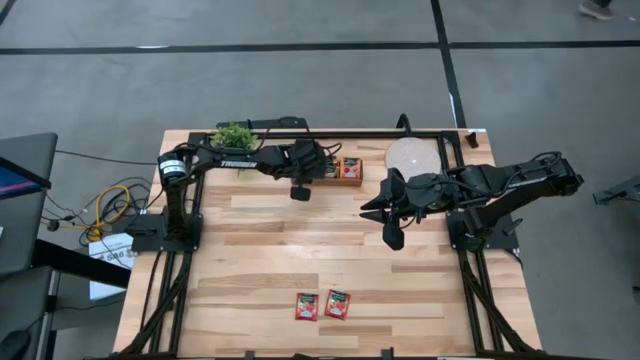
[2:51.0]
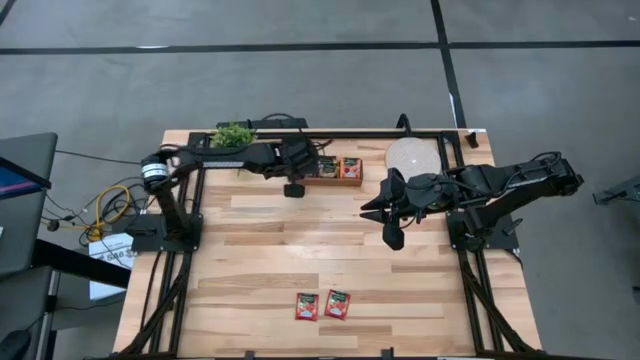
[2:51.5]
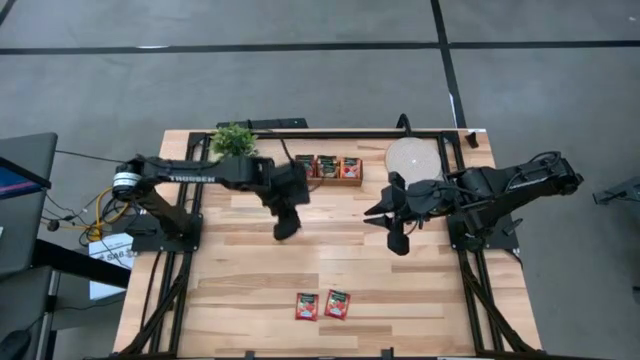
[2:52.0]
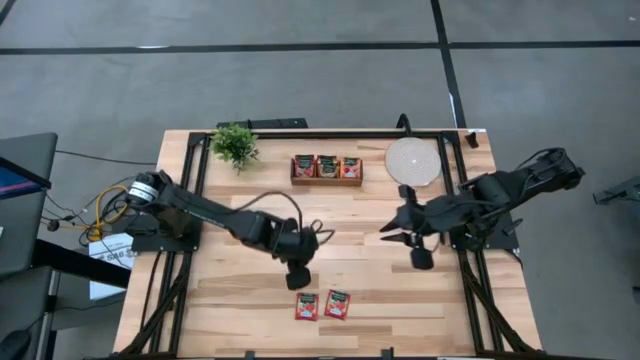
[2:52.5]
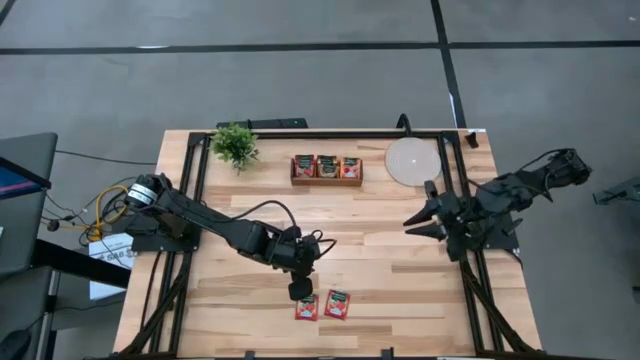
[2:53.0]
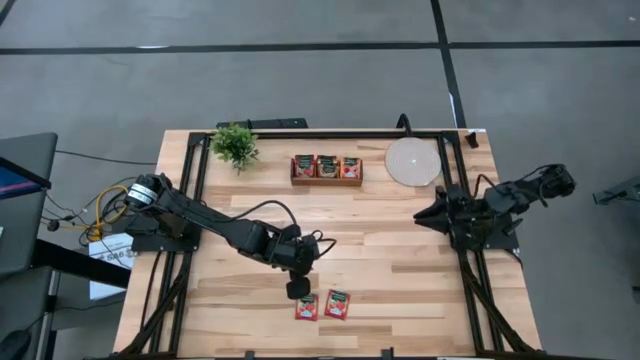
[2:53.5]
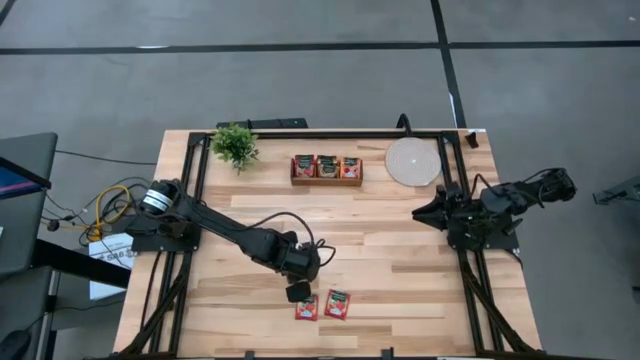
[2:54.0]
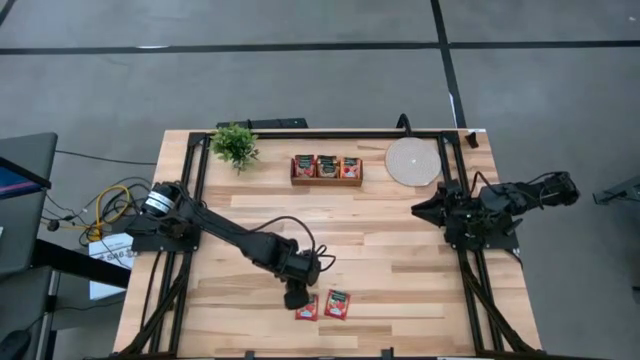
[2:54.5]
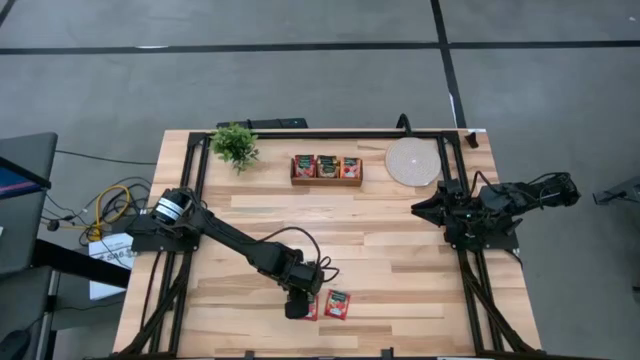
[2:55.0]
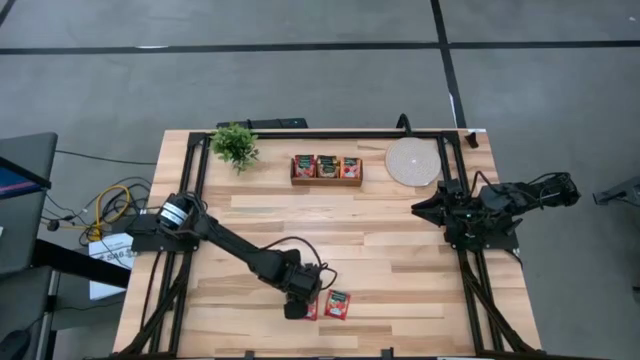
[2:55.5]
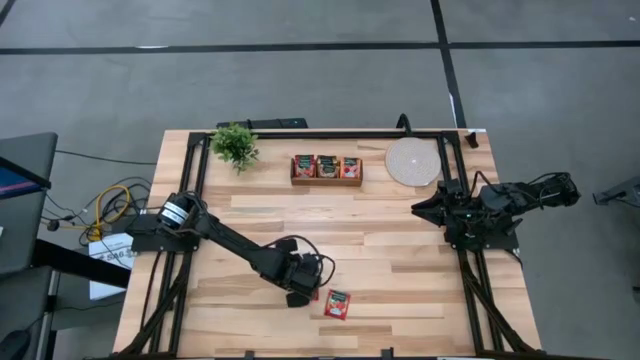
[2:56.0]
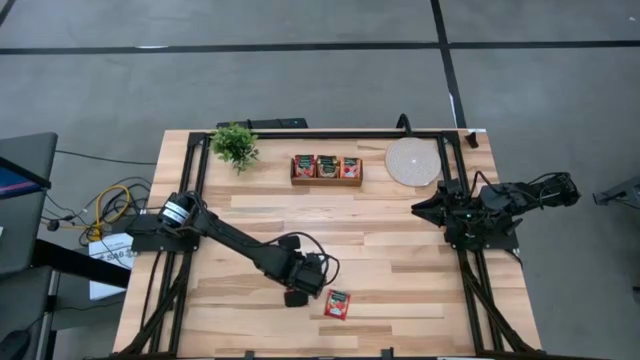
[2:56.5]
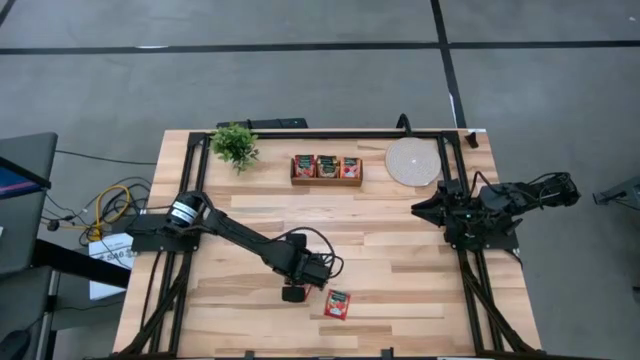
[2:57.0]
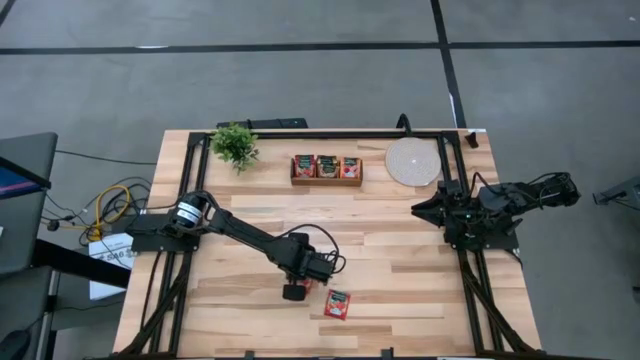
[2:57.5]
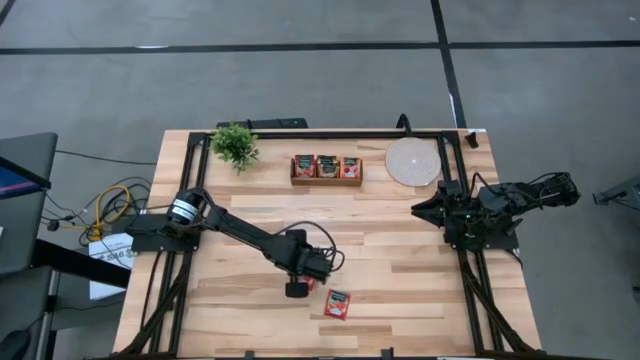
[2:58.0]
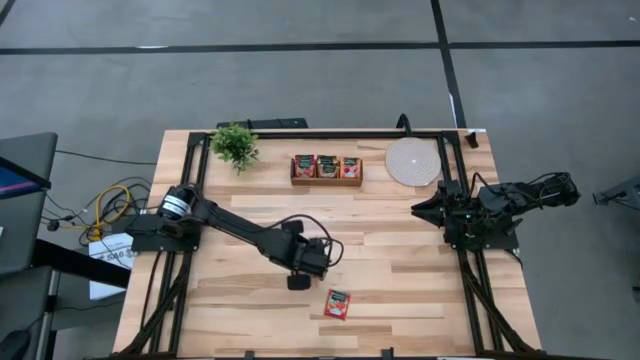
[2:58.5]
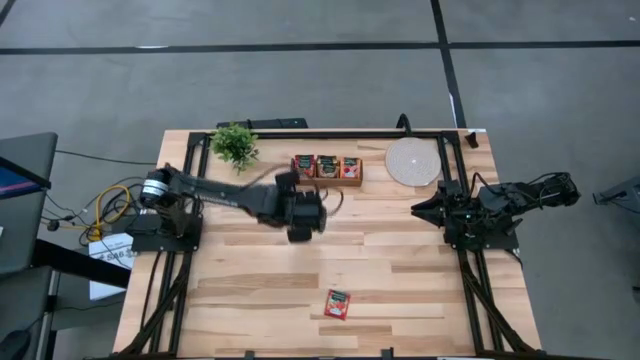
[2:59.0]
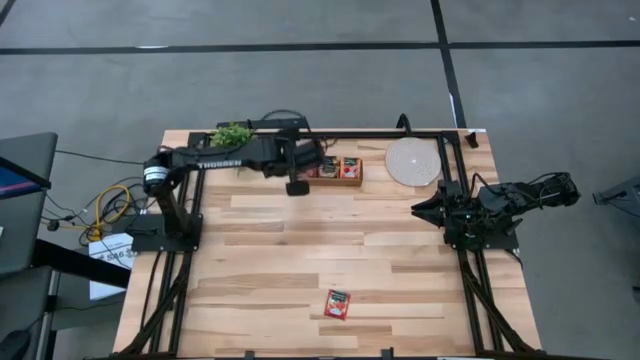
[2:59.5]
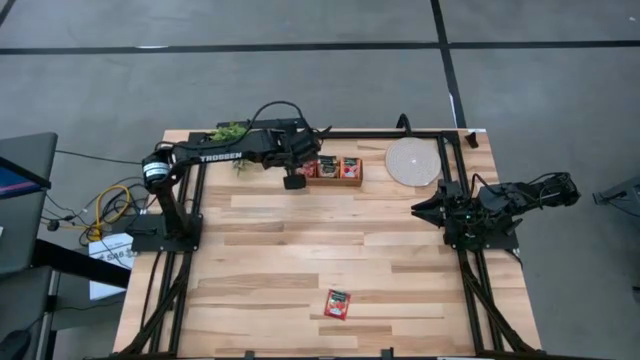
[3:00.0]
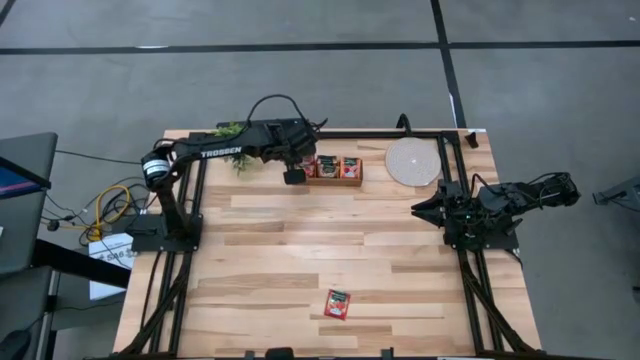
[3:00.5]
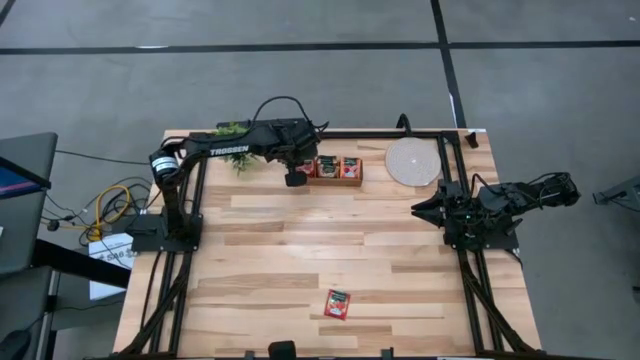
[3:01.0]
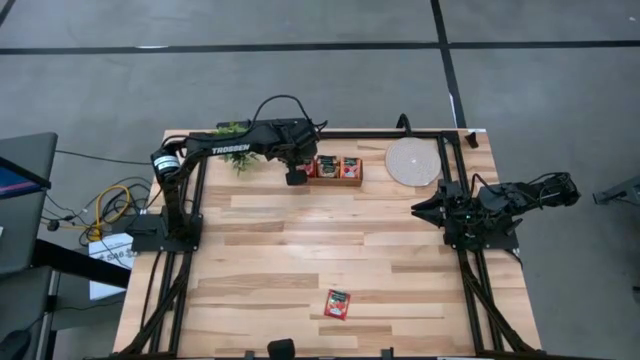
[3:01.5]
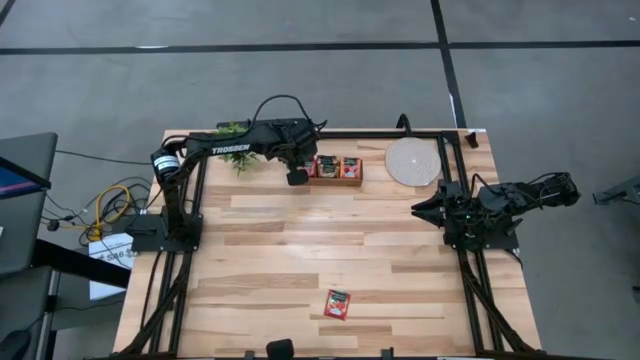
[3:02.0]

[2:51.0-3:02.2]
Task: Pick & Place Tea
Put the left red tea bag into the left section of the wooden organizer

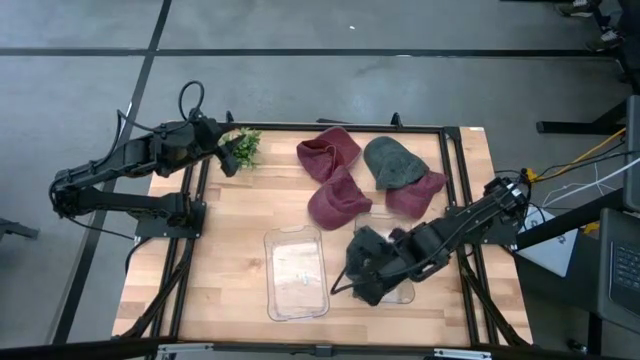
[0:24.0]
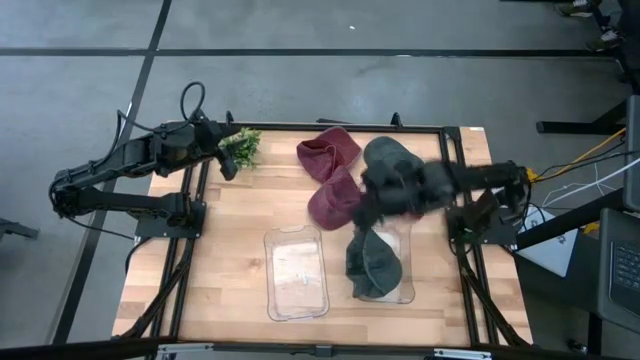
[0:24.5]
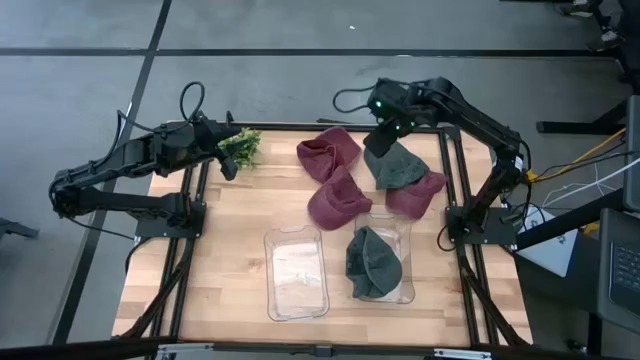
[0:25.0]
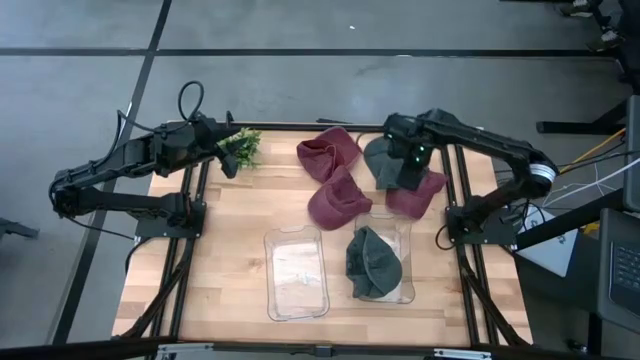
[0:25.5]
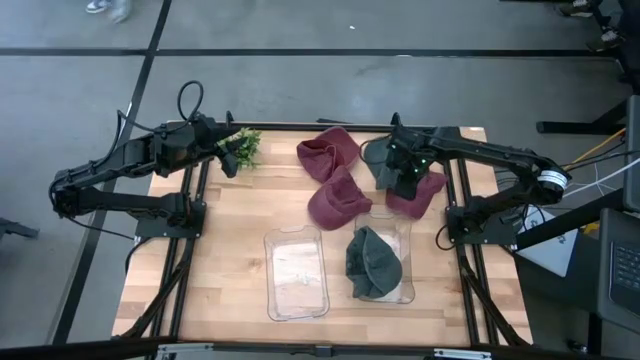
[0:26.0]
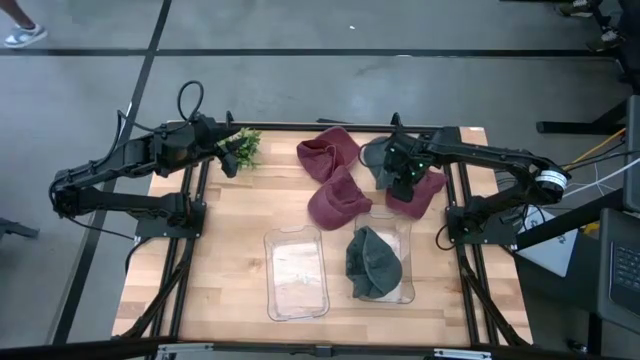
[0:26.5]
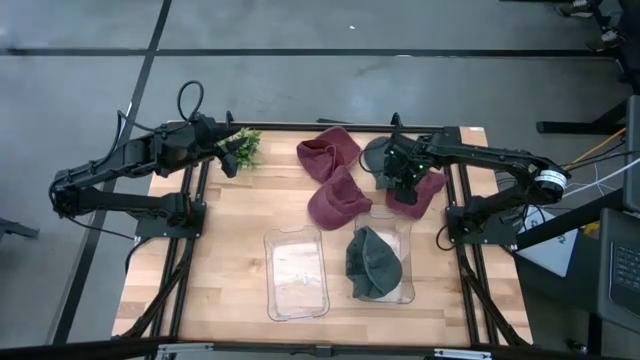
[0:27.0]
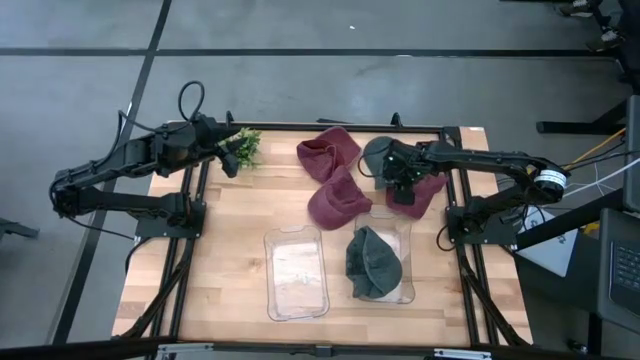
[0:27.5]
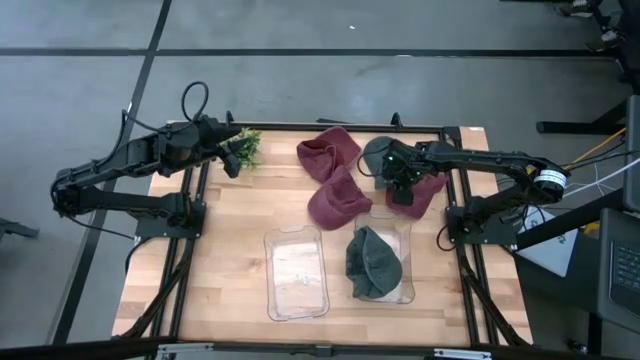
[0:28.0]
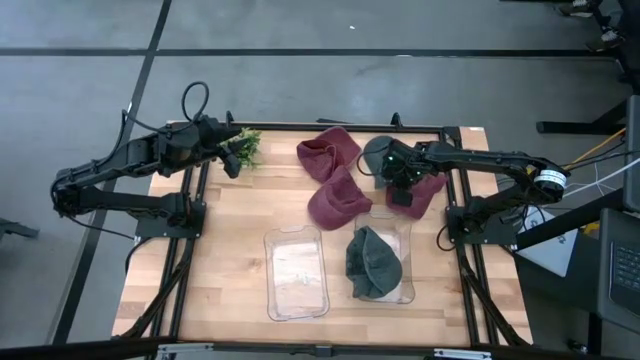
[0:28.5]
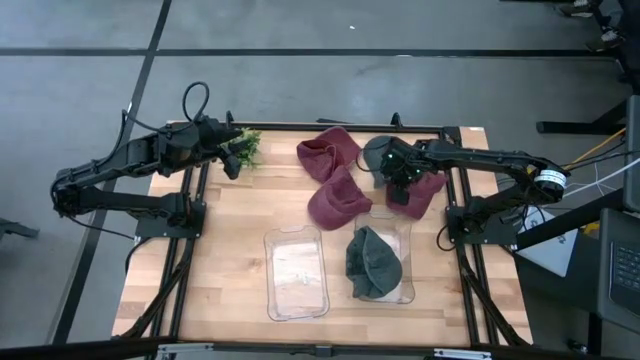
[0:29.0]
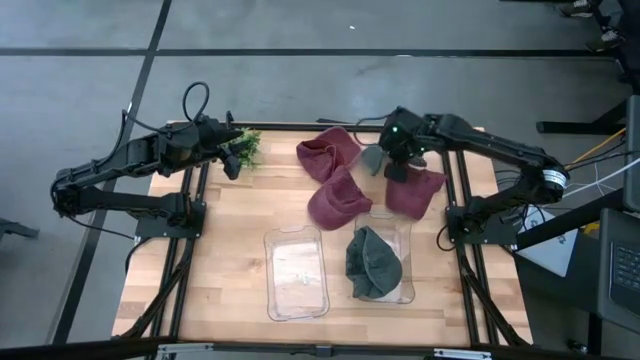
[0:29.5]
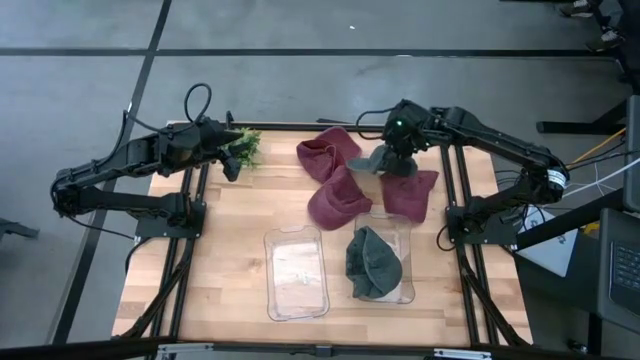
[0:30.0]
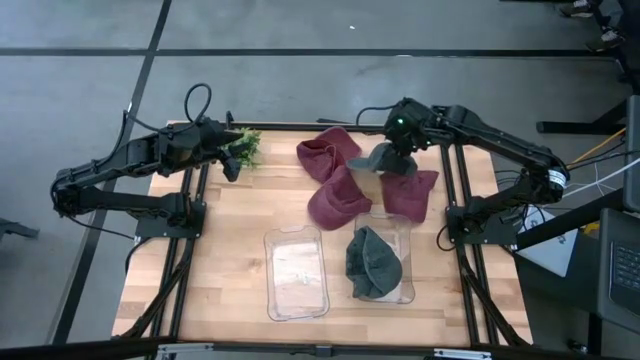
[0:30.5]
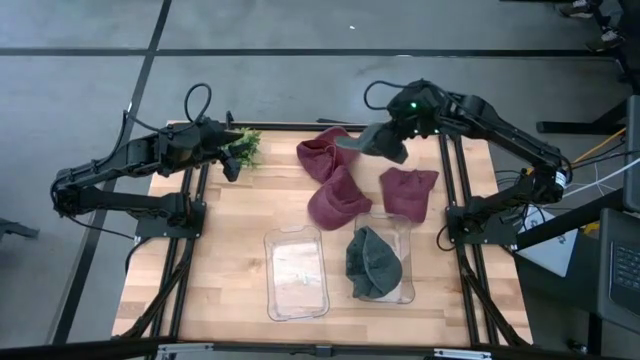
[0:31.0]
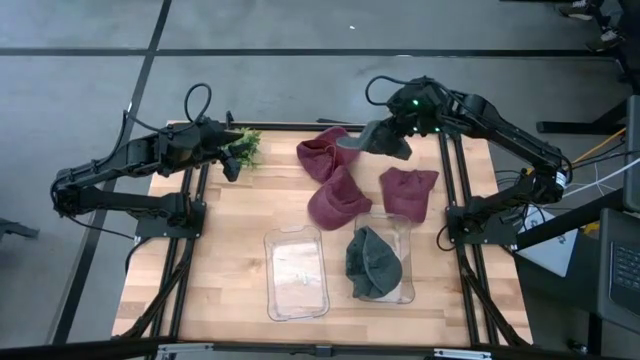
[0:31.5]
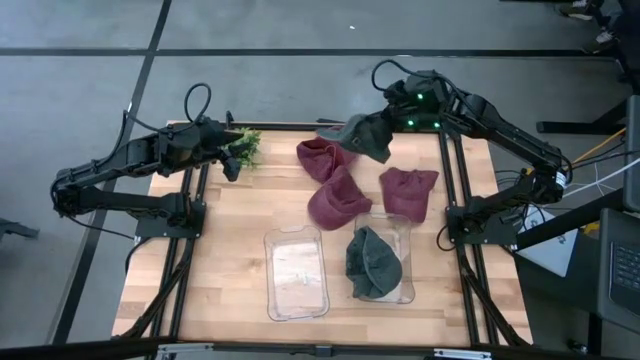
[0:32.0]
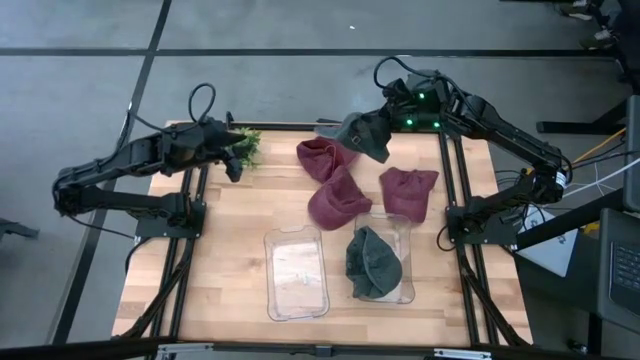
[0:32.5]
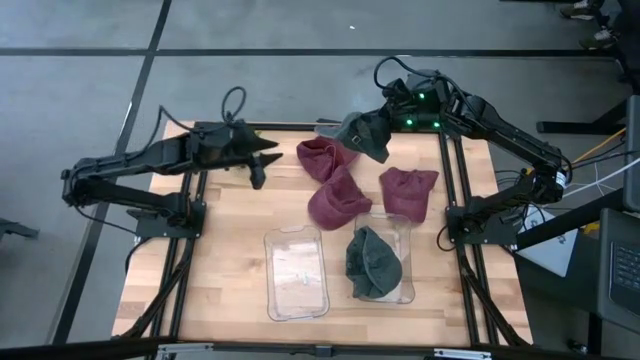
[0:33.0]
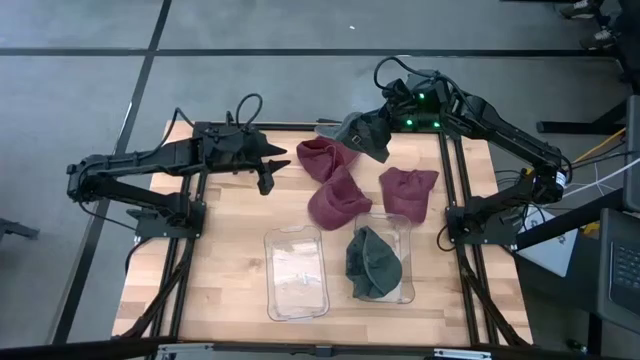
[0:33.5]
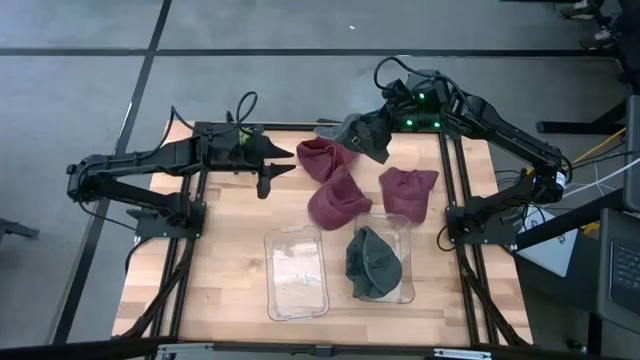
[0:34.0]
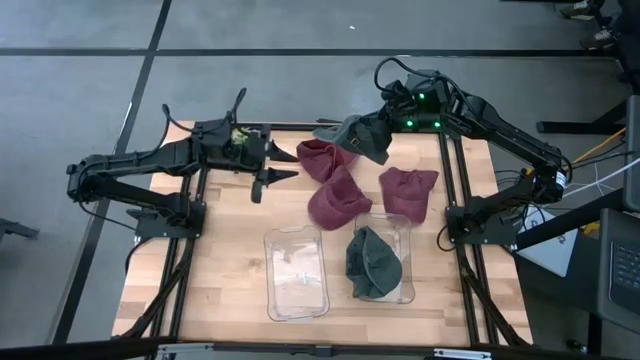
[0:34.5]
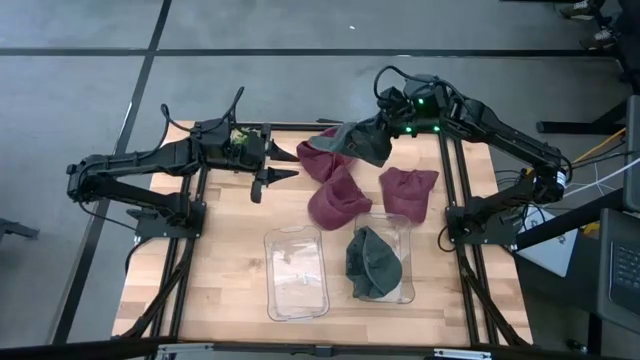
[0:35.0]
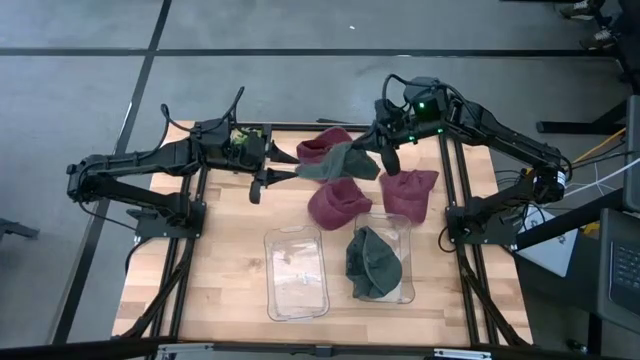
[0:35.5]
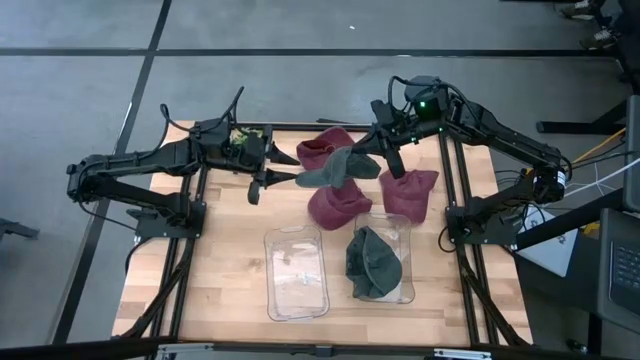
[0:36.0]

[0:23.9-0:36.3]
Task: Pick & Place hat
Put the black cap into the right transparent bin
